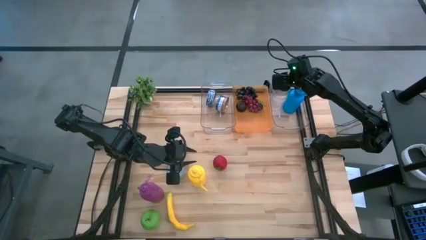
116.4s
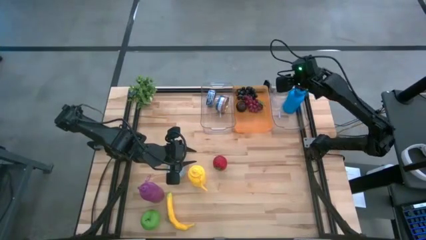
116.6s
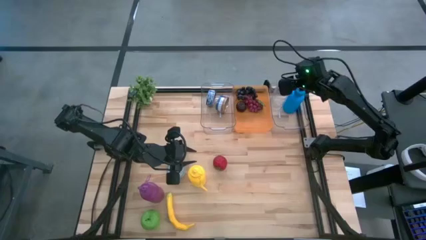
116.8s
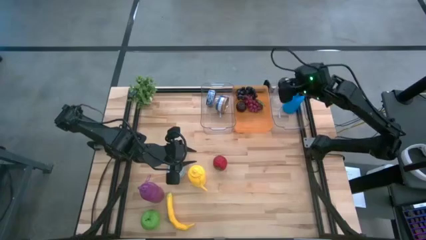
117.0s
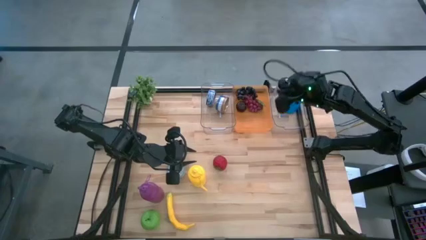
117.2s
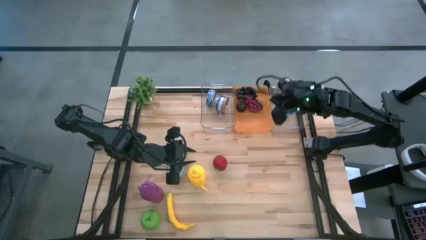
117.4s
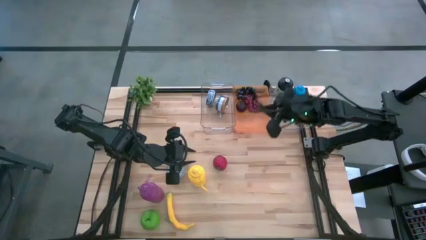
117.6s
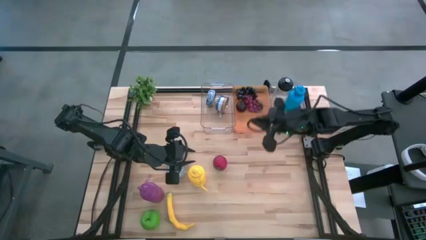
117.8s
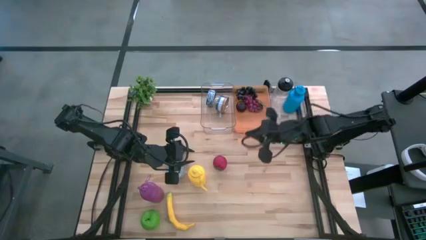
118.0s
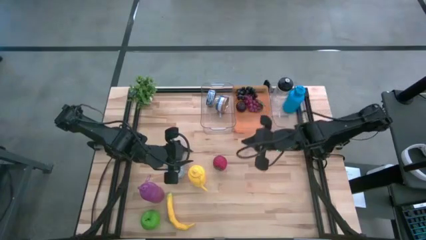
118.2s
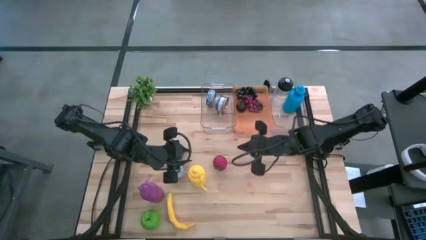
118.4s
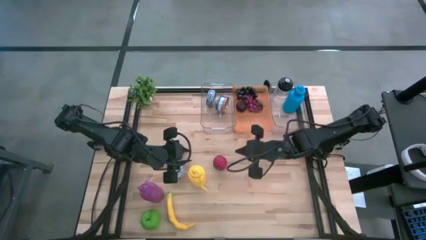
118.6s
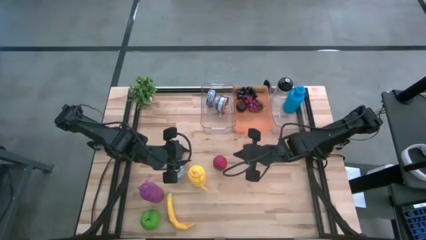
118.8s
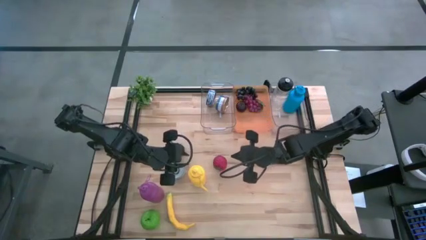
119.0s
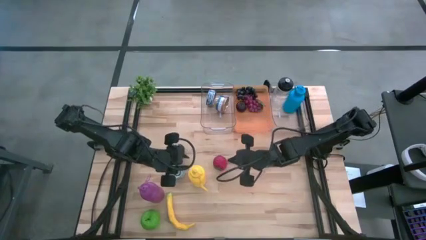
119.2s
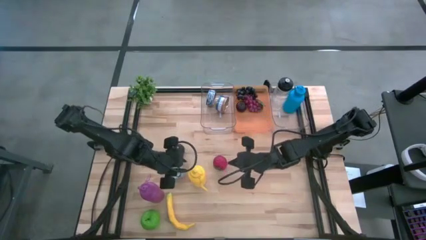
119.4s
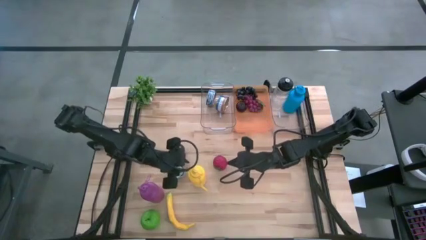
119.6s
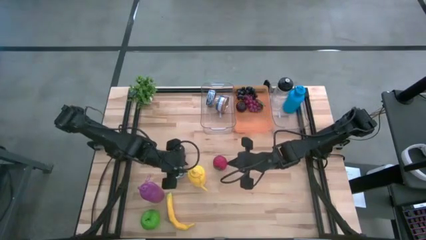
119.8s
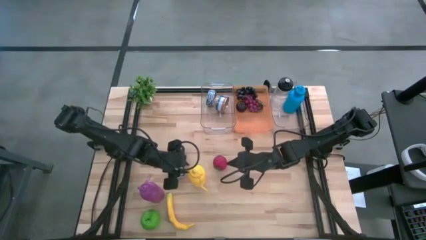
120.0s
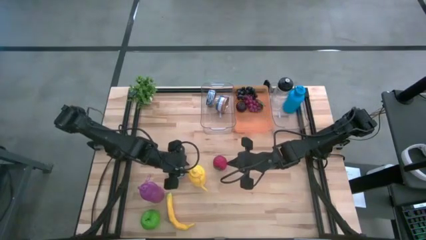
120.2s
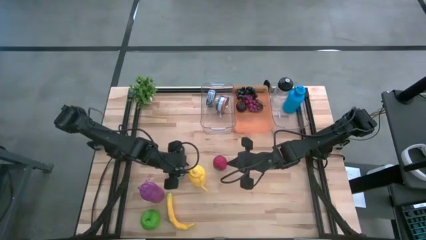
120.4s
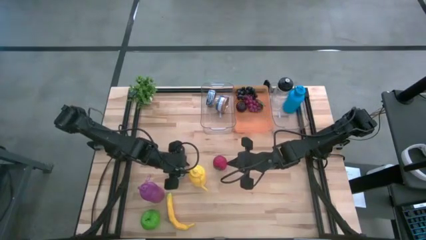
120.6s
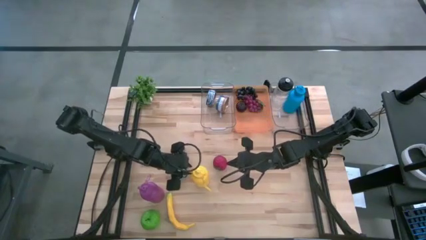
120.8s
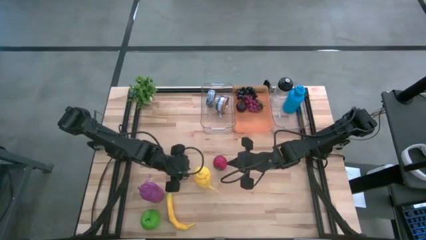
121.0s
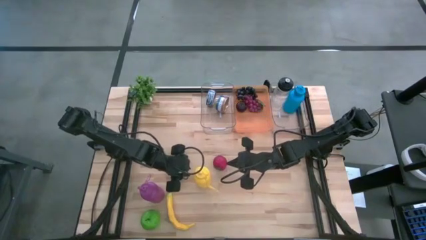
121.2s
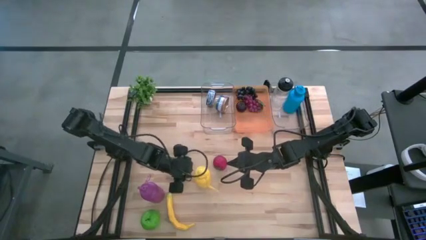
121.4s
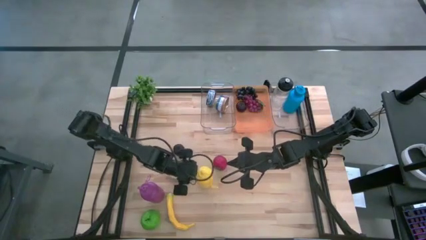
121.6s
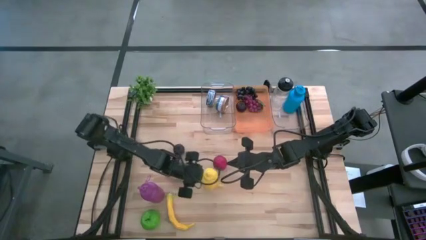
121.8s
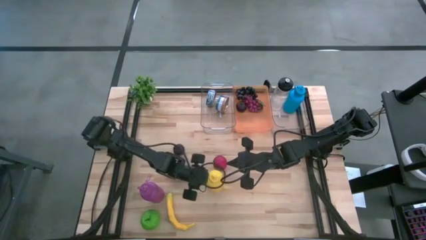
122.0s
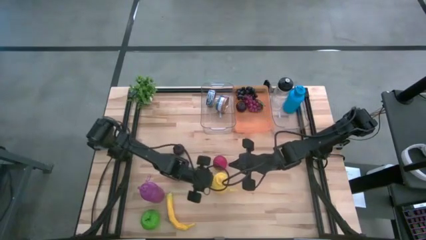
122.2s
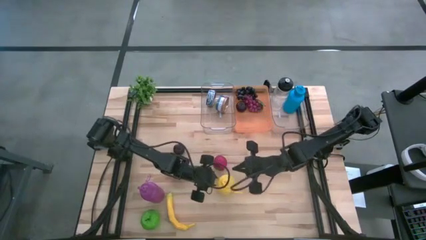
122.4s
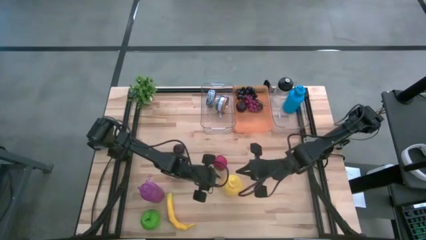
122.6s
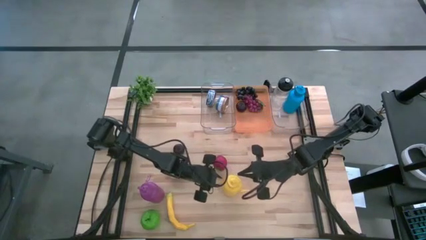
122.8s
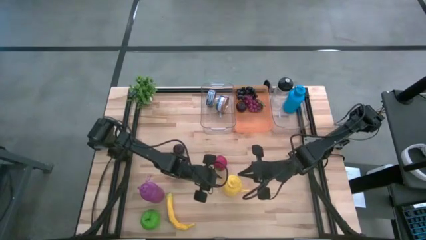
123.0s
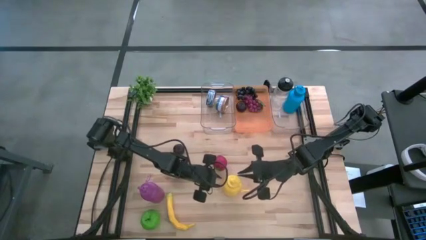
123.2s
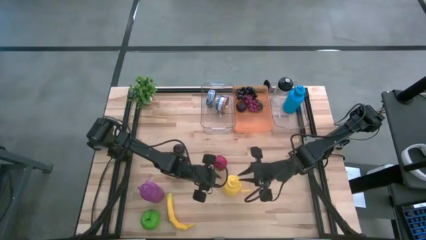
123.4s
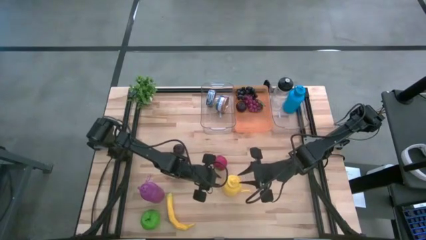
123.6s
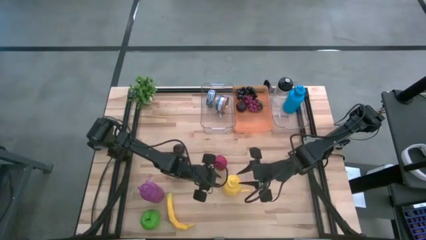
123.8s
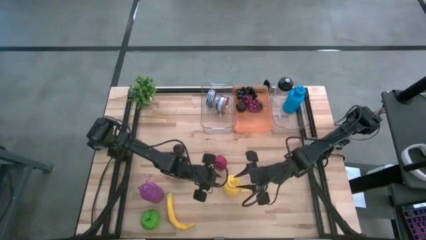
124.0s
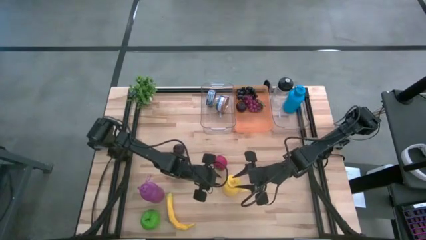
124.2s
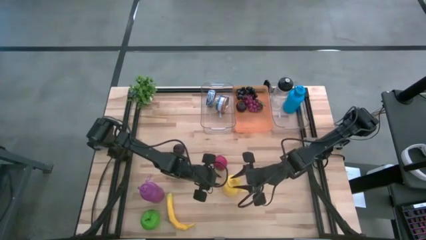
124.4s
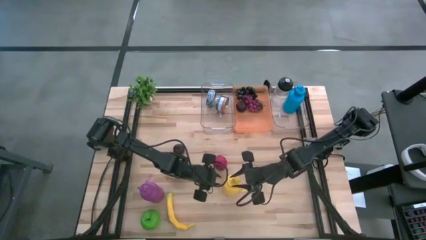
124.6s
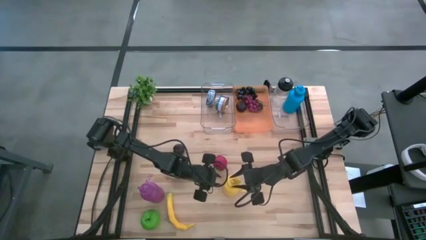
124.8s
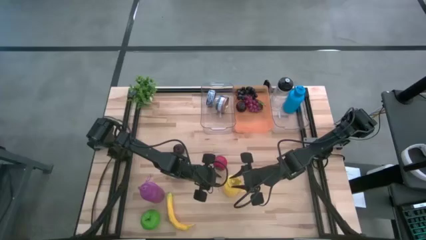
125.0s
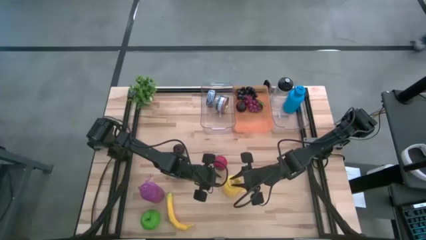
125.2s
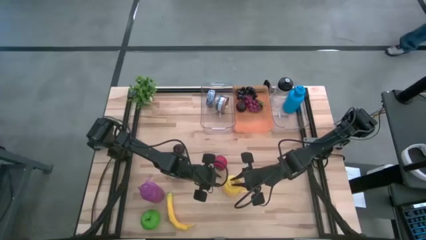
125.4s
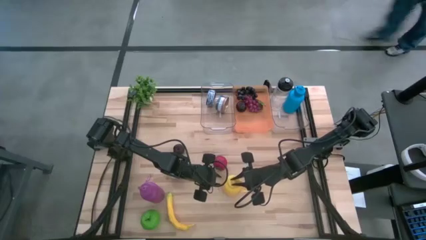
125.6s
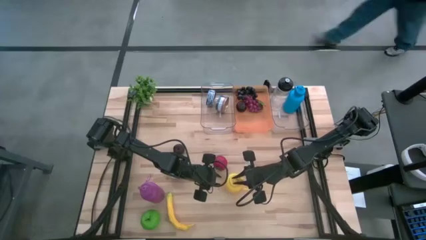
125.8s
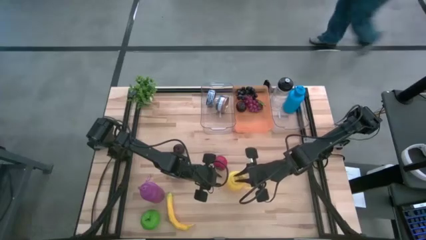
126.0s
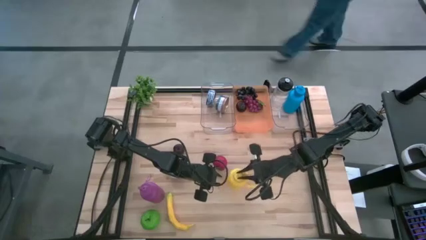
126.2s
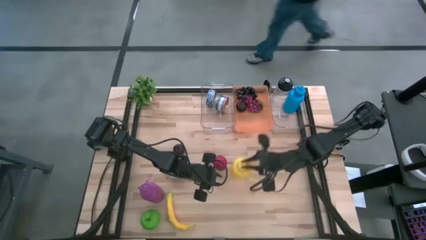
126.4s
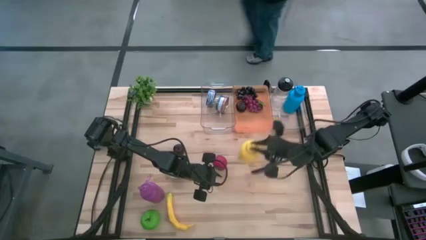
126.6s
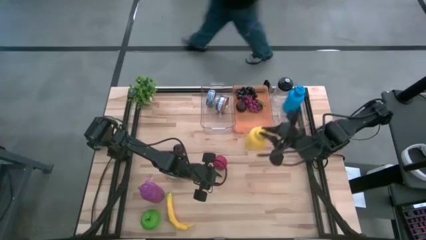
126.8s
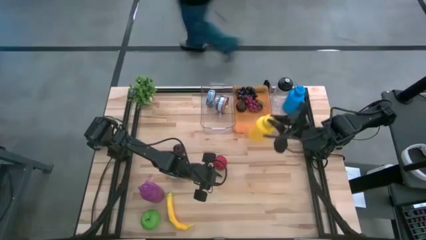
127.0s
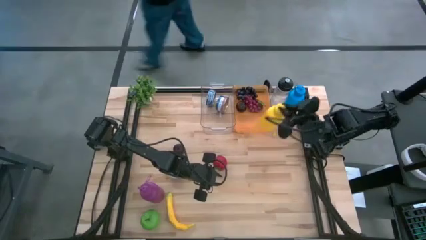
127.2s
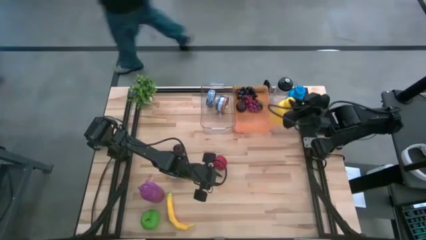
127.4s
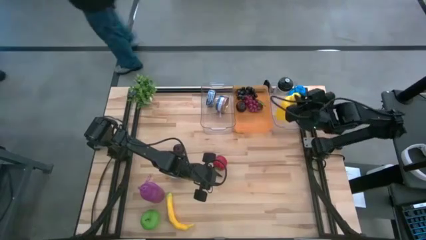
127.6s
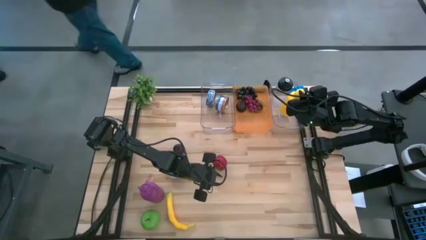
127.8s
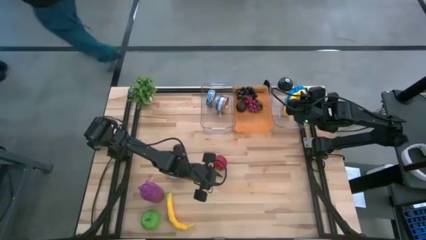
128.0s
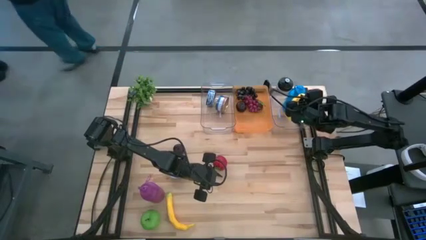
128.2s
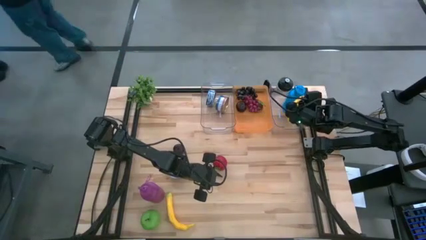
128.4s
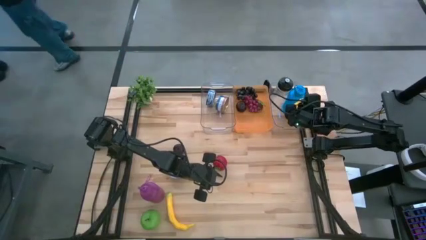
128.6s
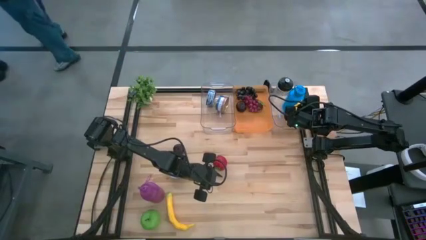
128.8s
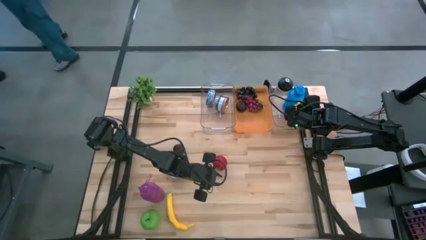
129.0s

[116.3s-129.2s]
Task: Pick & Place Food Item
Put the yellow tumbler into the right transparent bin
